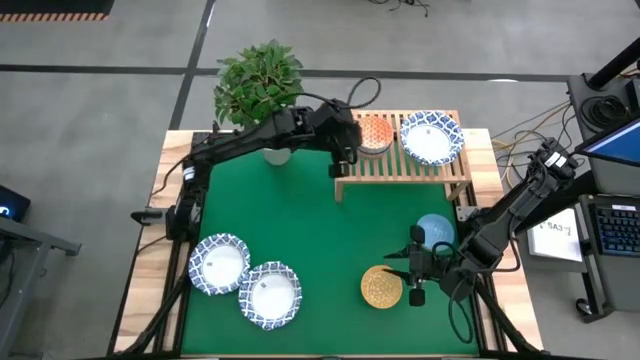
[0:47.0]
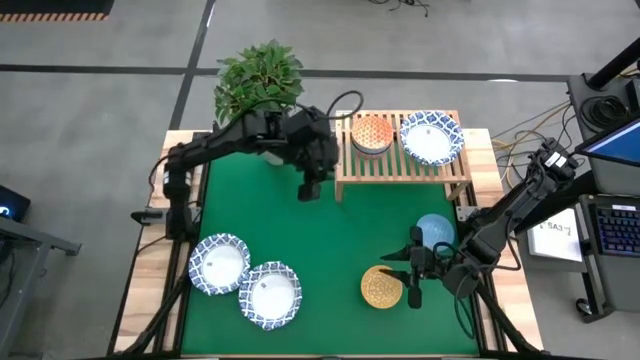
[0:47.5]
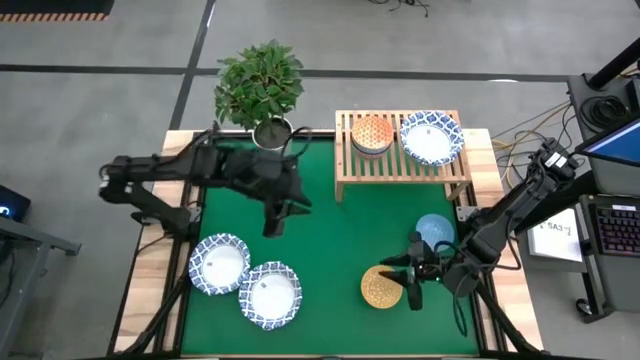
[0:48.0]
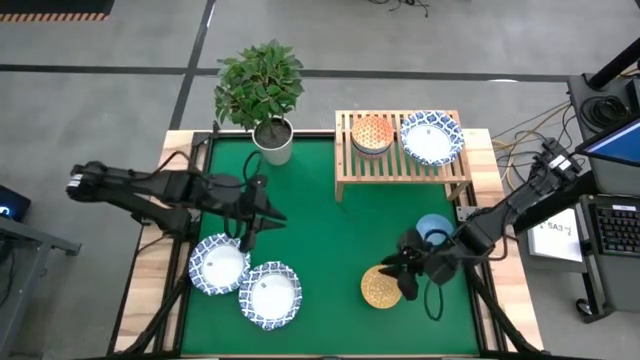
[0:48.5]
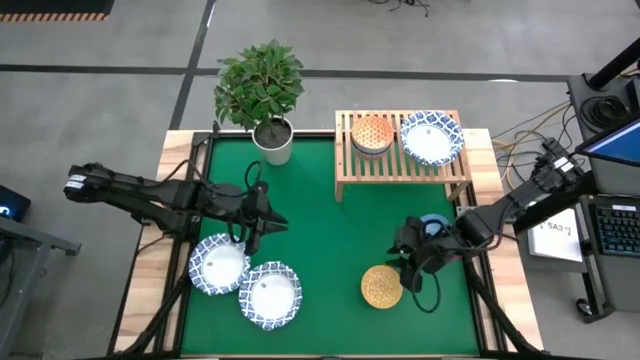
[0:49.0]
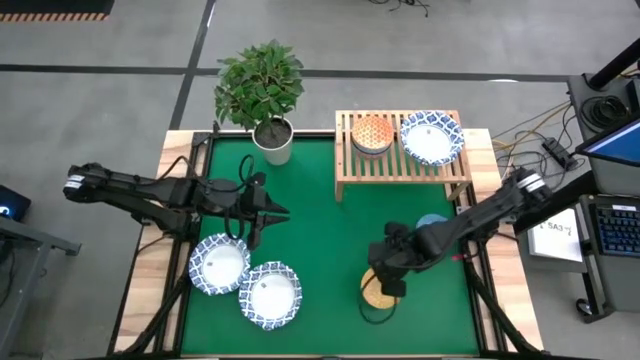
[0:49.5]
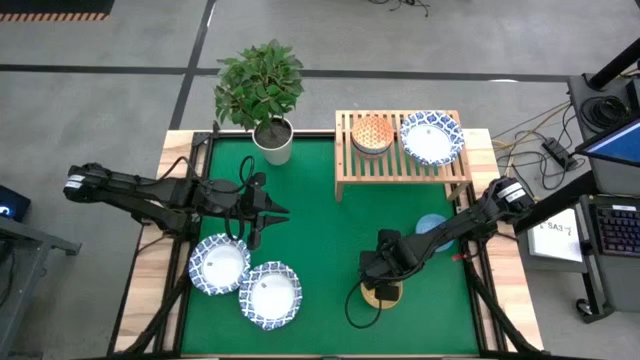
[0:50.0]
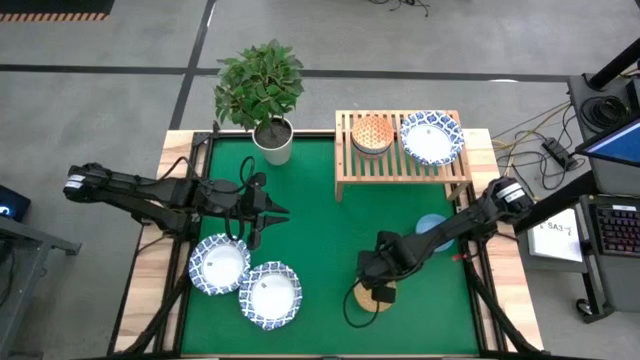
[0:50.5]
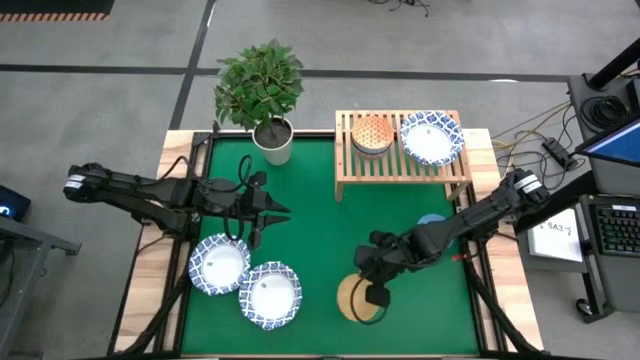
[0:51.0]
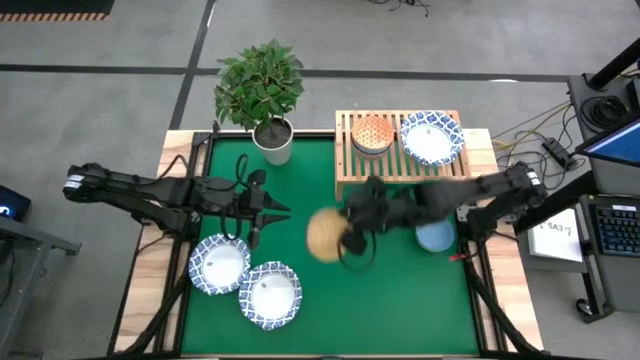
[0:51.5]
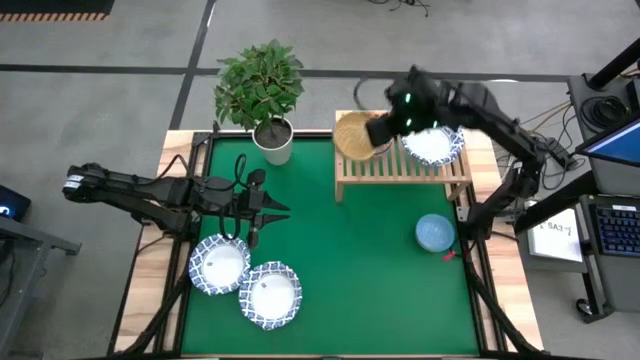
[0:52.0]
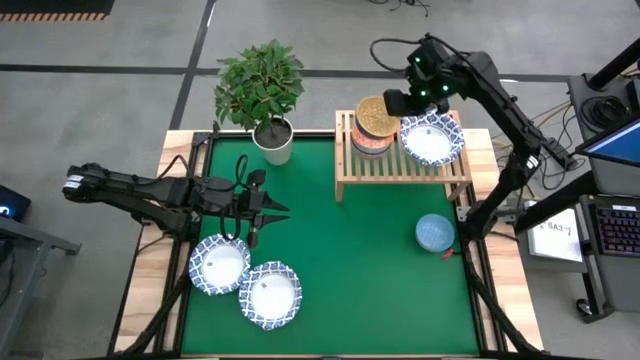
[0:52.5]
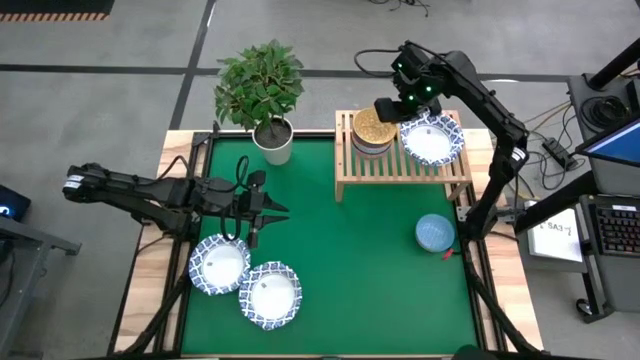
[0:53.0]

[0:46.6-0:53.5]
Task: Place and stack bowls onto a shelf
Stack the yellow patterned bowl on top of the yellow patterned bowl on the shelf

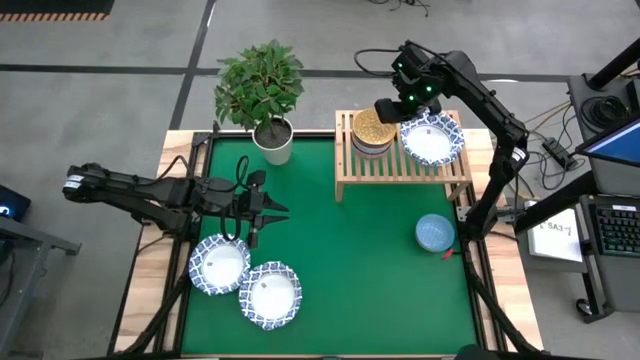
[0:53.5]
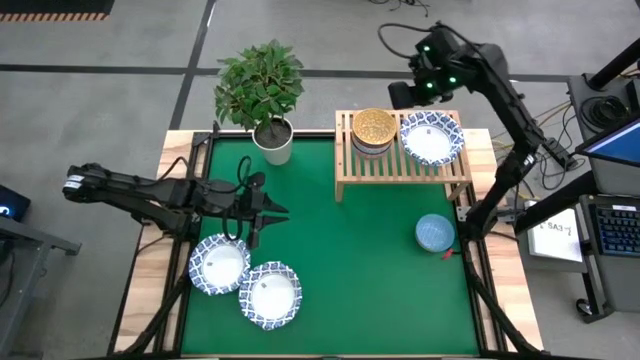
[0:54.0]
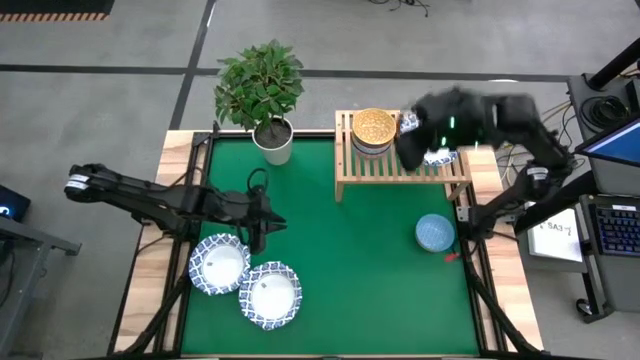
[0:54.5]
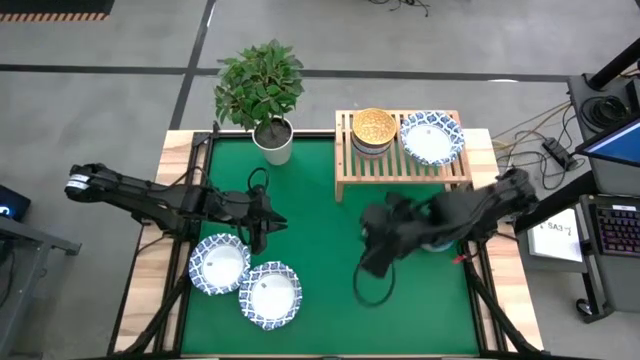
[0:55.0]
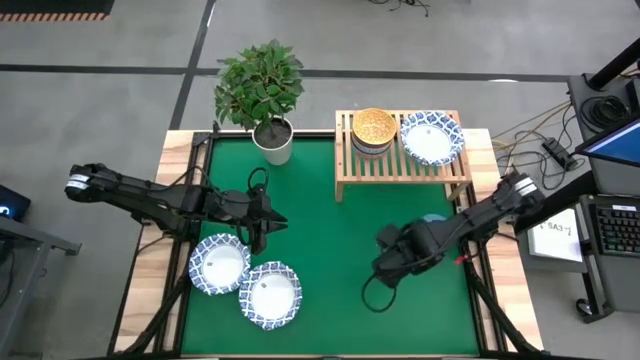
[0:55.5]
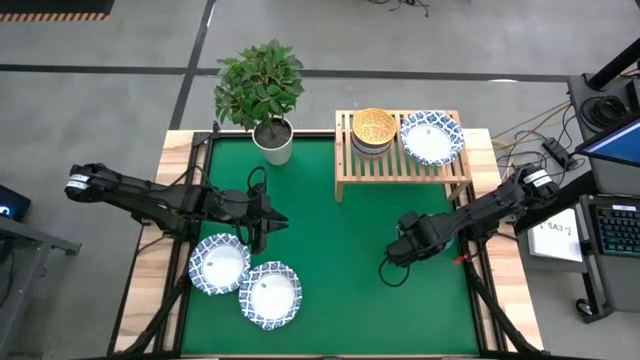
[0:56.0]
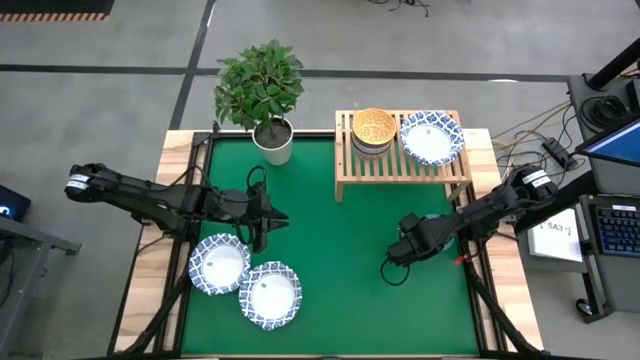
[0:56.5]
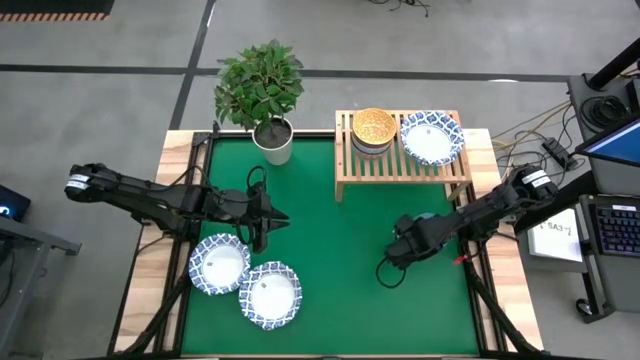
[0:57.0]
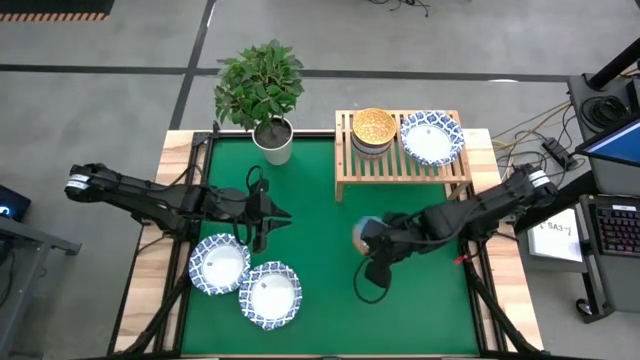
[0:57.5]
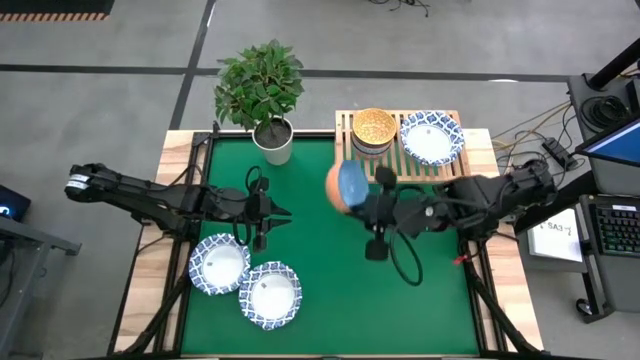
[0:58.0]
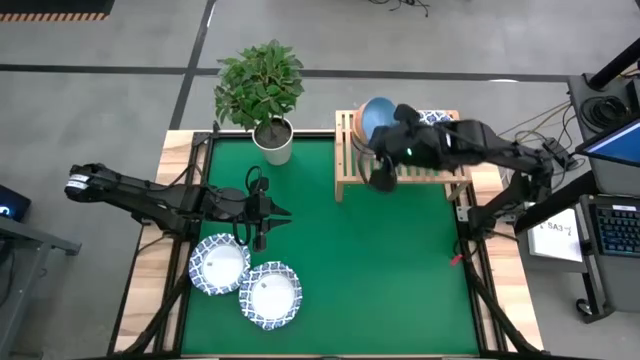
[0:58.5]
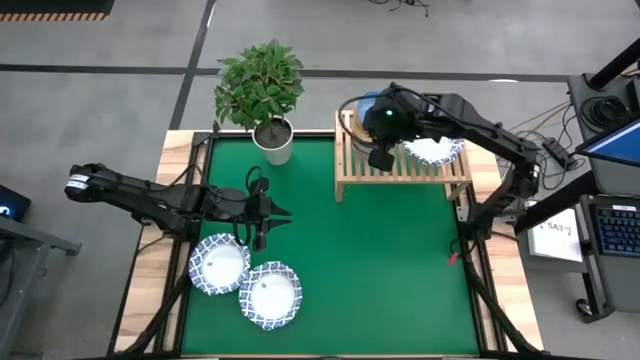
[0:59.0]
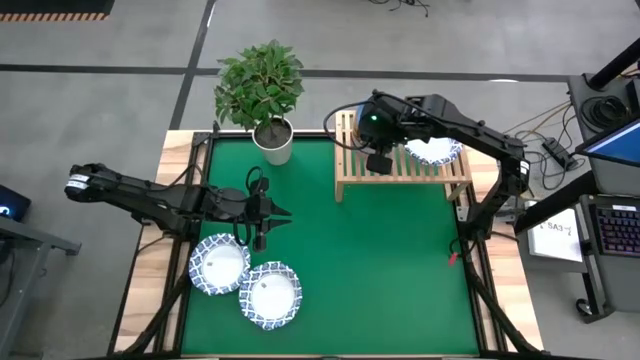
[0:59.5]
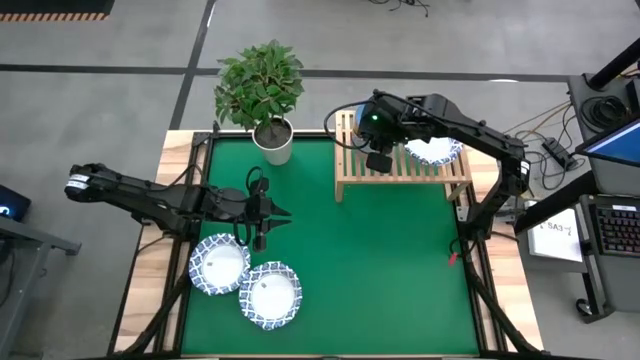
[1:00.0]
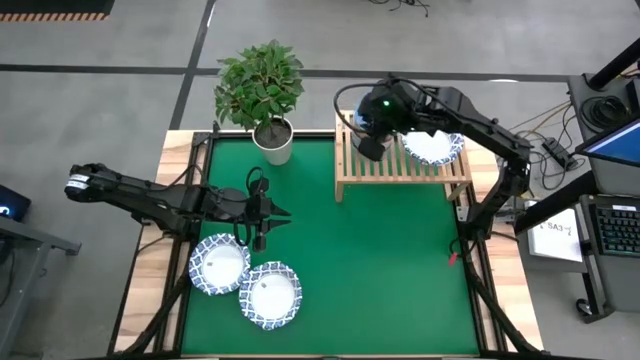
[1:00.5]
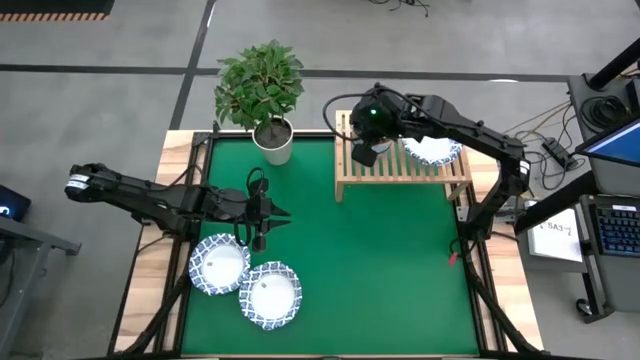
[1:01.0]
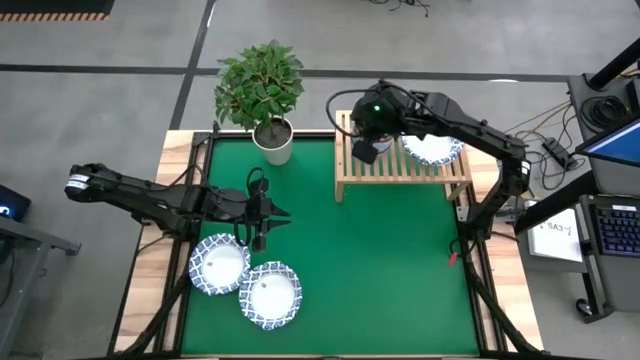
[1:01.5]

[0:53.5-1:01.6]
Stack the light blue patterned bowl on top of the yellow patterned bowl on the shelf

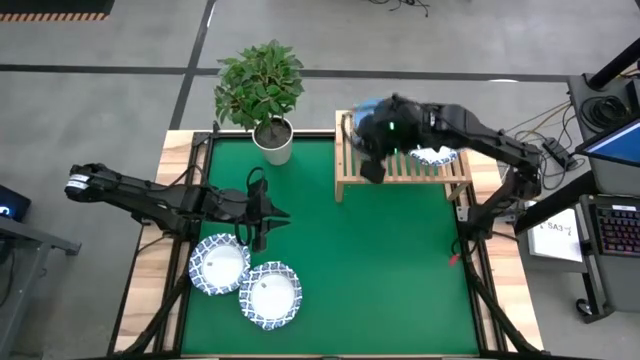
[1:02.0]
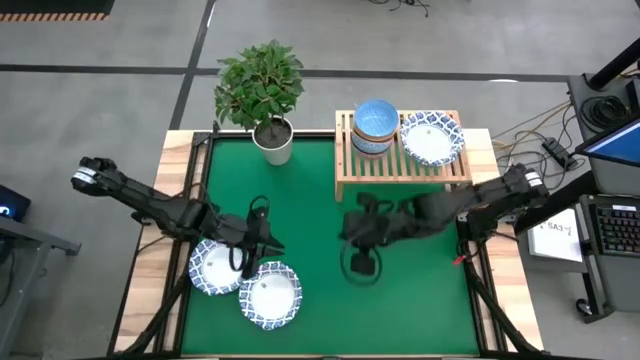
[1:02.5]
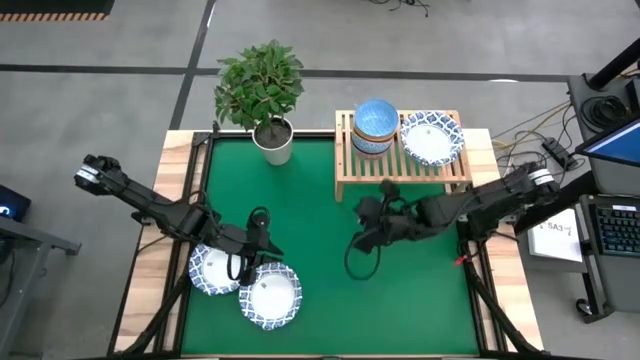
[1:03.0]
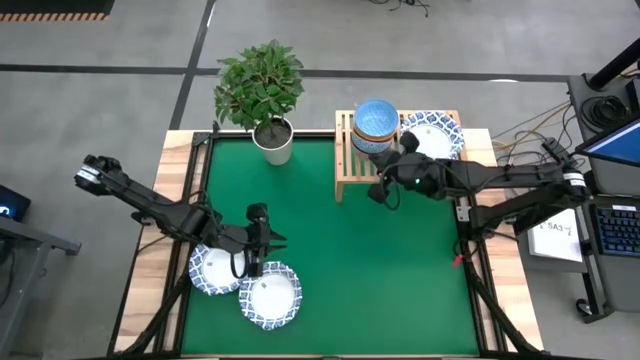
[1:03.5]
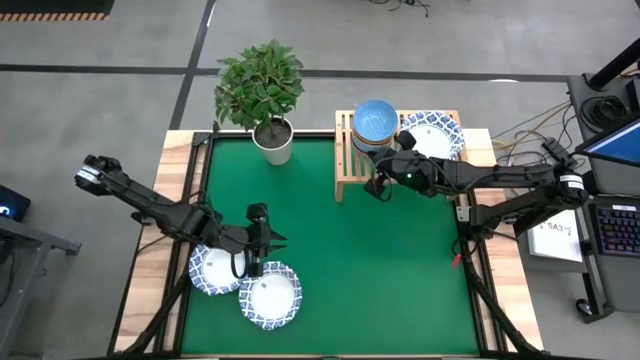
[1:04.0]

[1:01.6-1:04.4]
Adjust the stacked bowls on the shelf

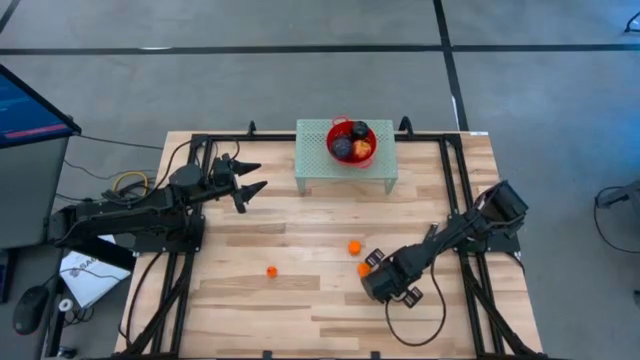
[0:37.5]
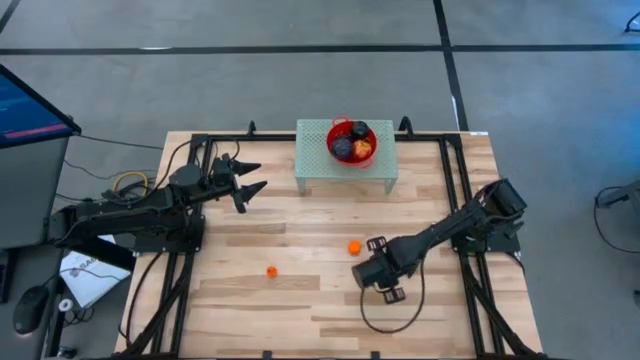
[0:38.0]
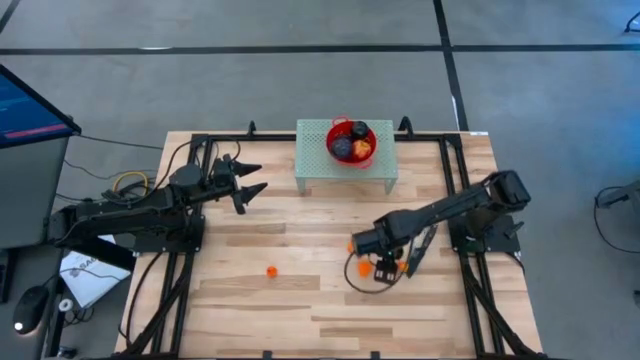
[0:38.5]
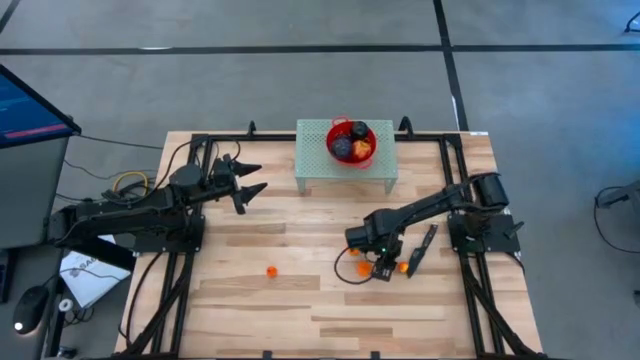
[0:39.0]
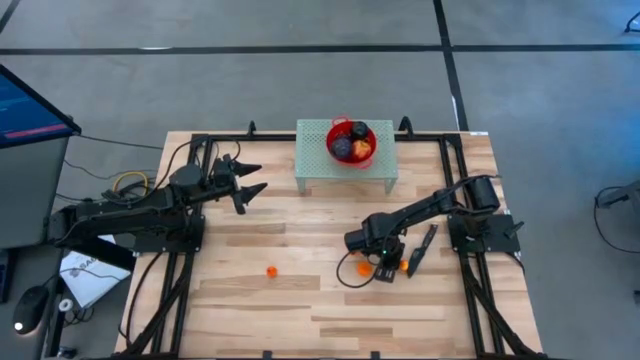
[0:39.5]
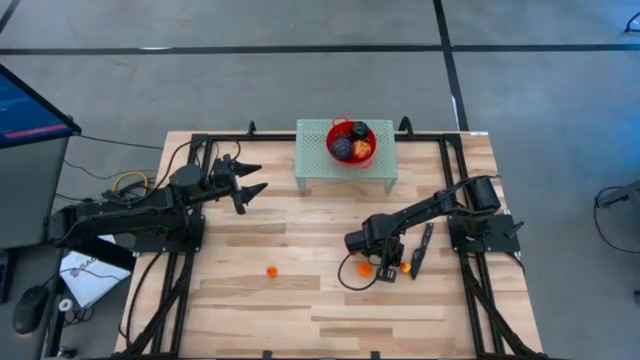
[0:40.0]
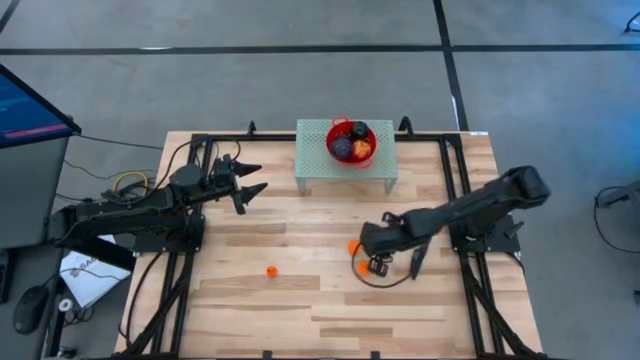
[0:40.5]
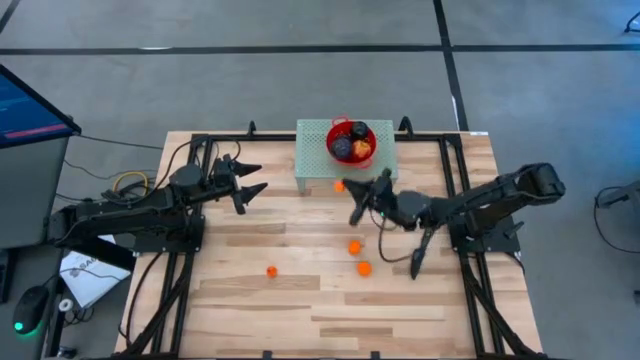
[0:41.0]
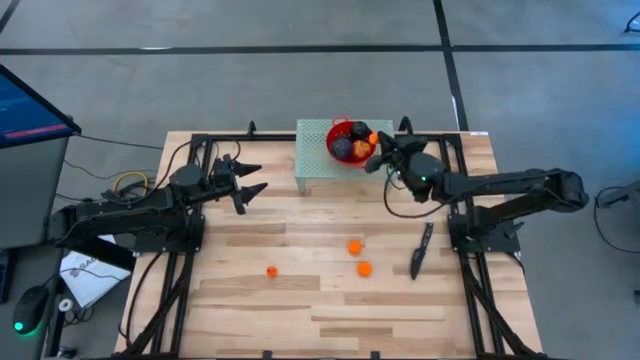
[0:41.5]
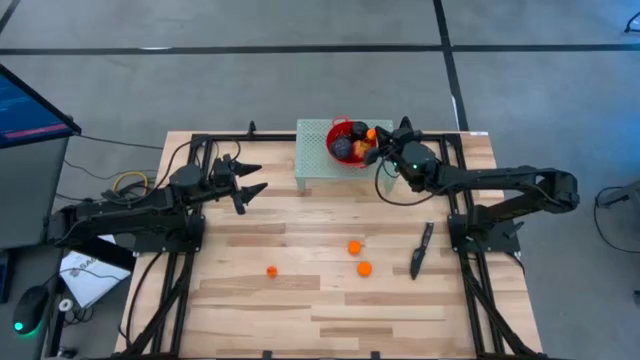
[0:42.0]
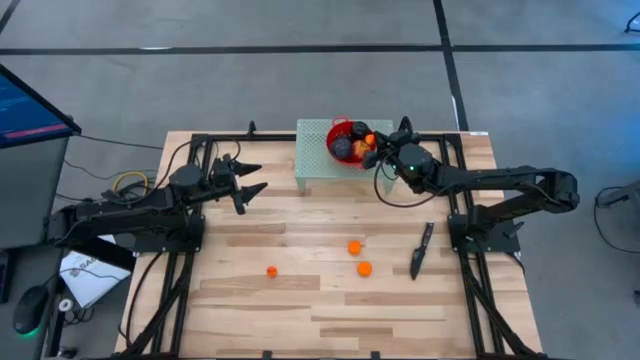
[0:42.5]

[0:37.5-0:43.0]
Task: Pick & Place Fruit
Put the right orange pear into the red strainer bowl on the shelf
